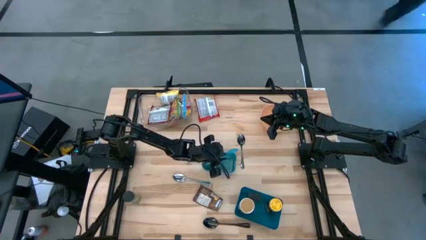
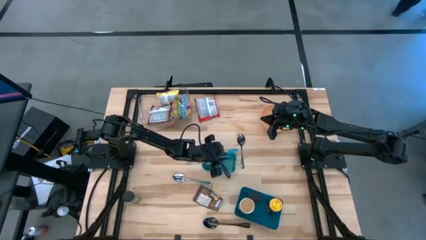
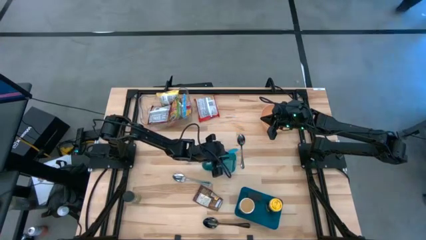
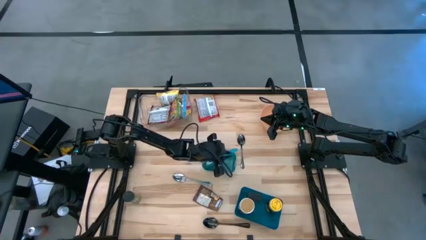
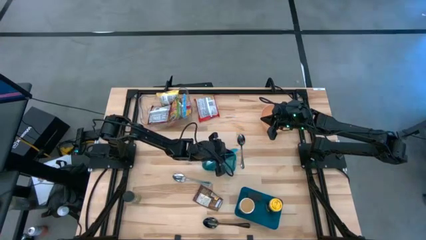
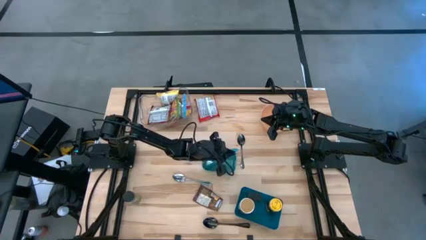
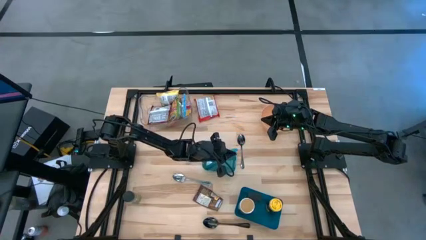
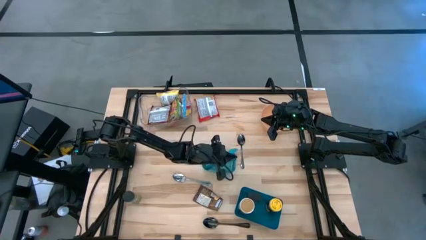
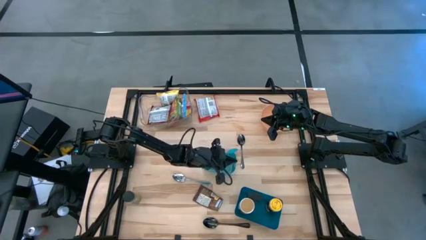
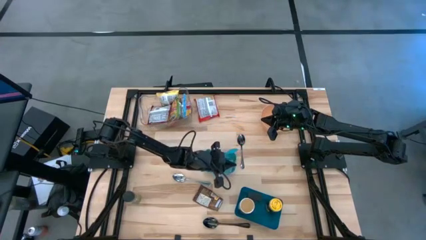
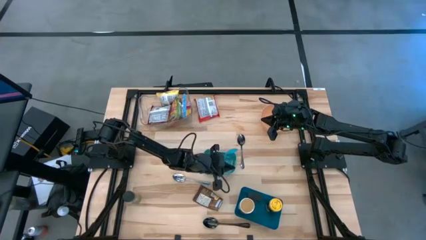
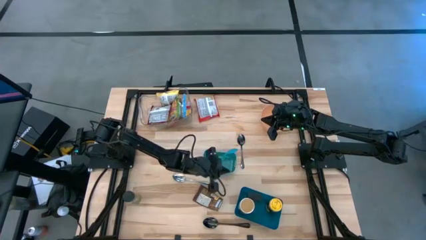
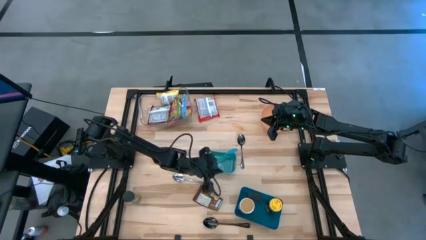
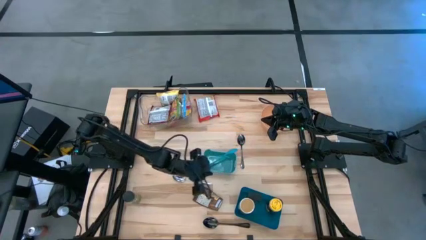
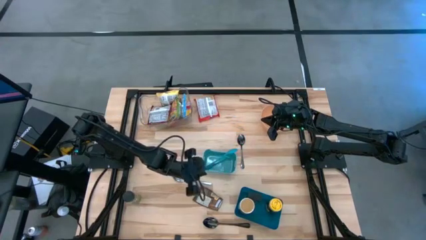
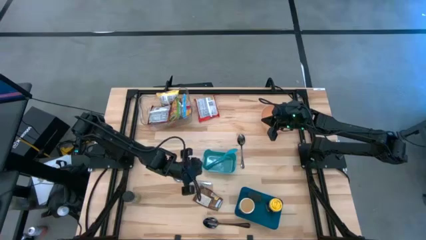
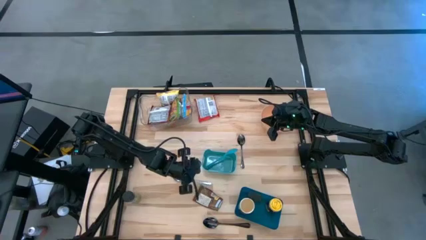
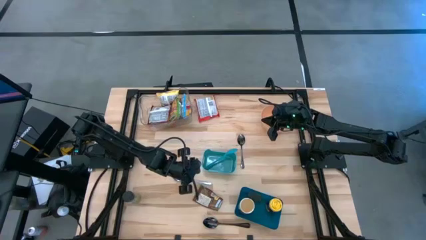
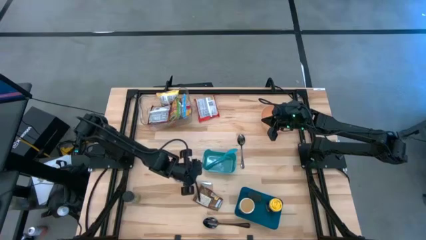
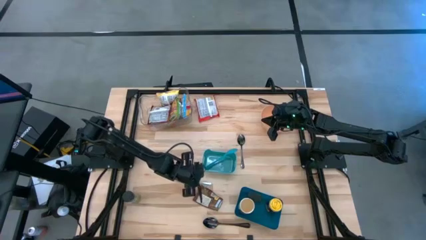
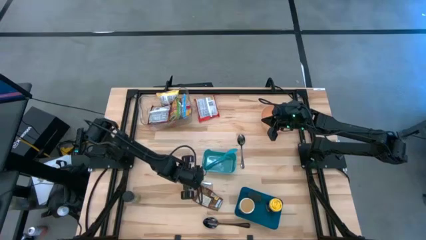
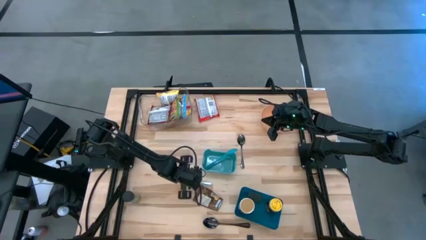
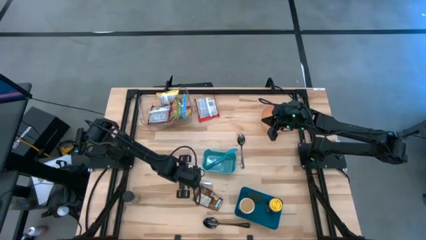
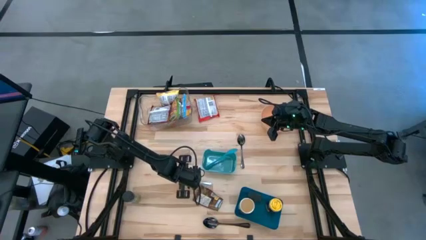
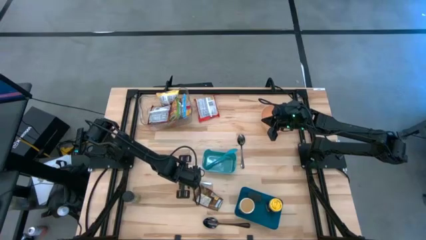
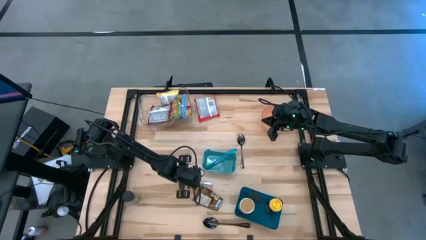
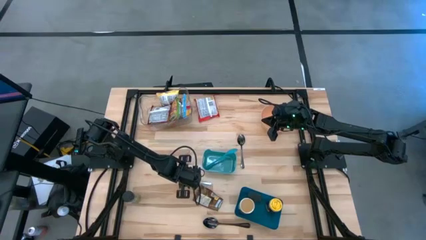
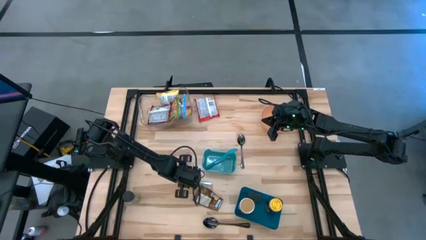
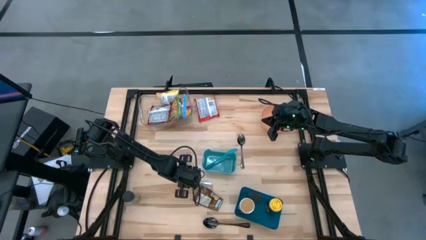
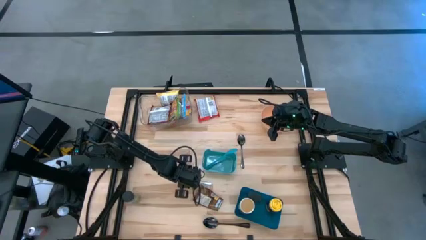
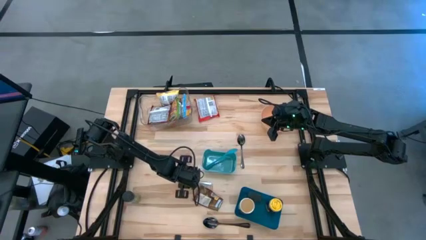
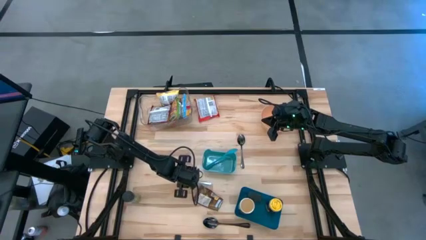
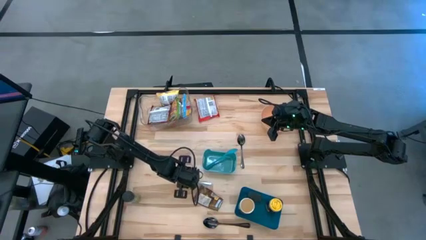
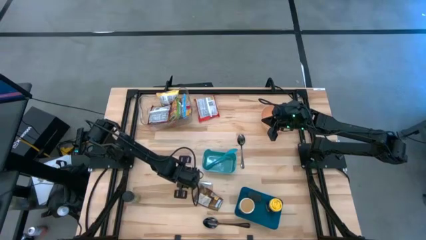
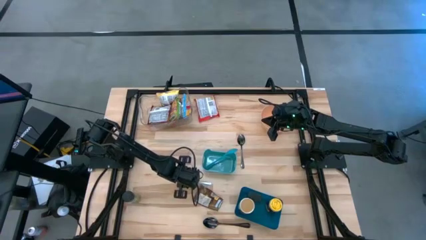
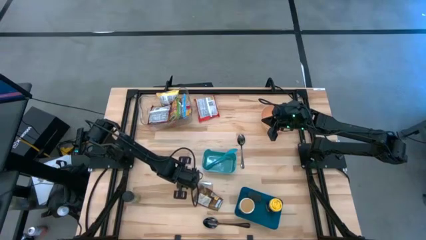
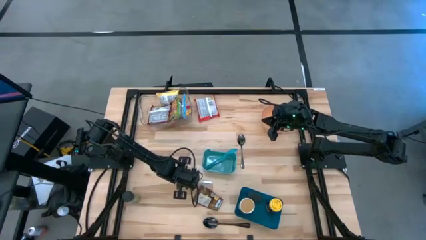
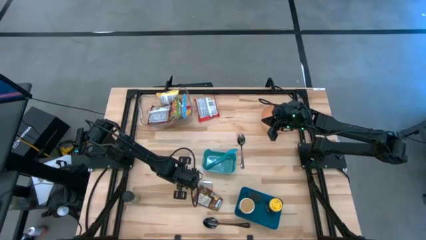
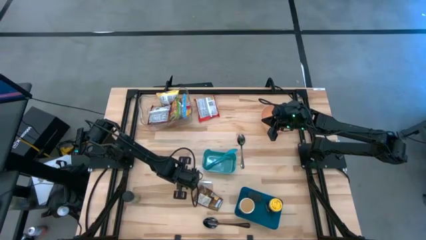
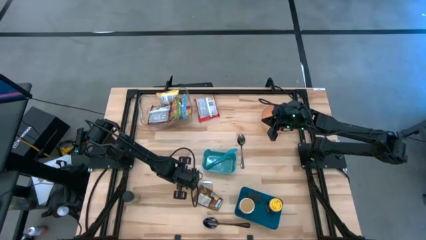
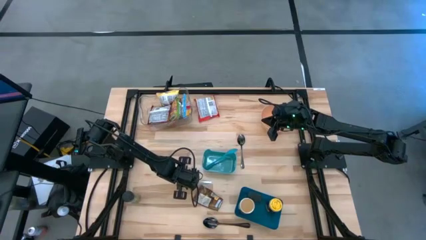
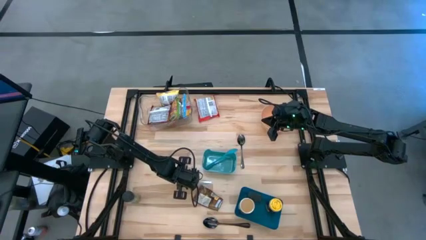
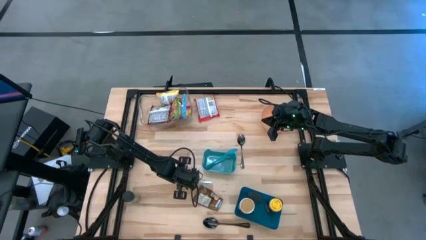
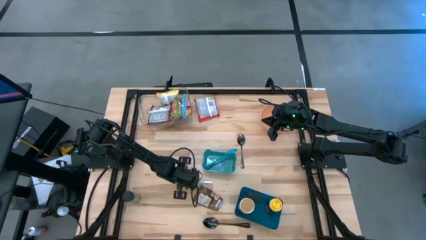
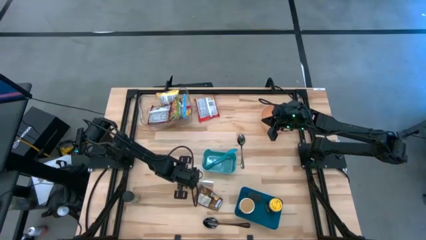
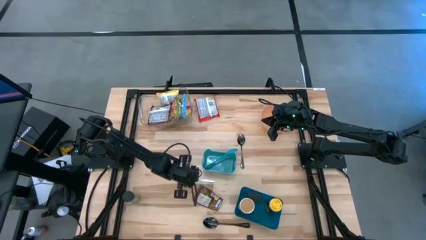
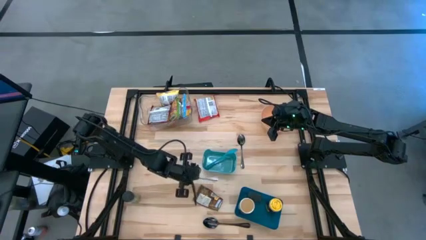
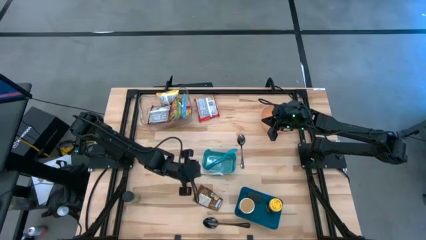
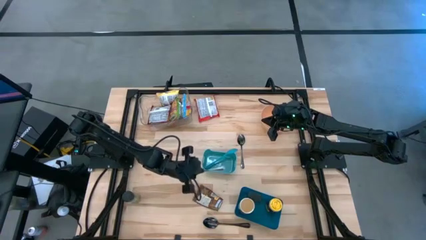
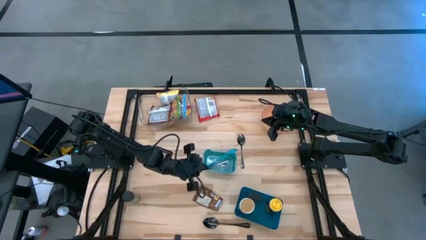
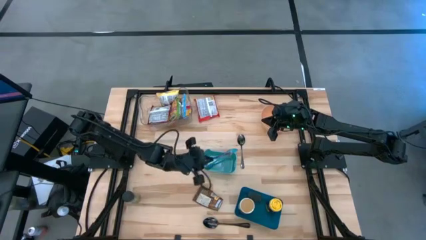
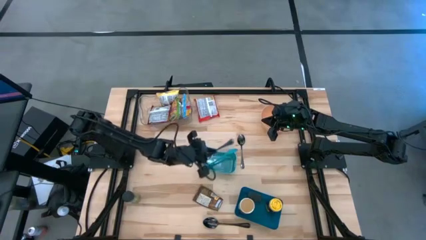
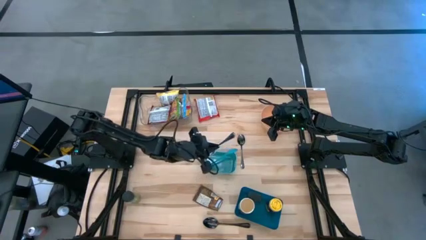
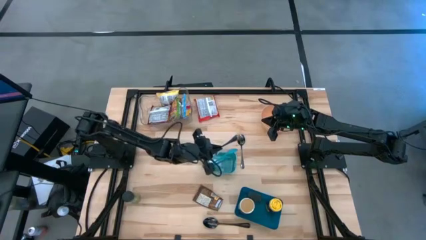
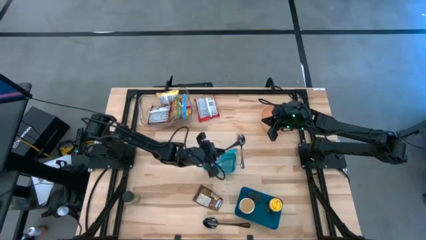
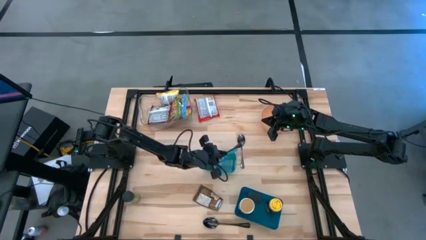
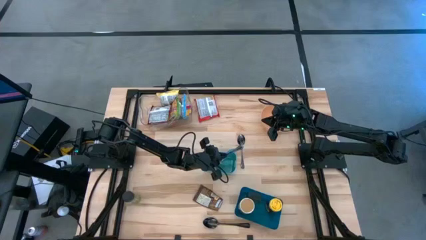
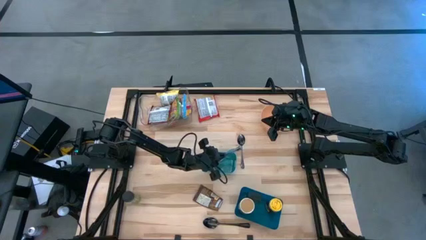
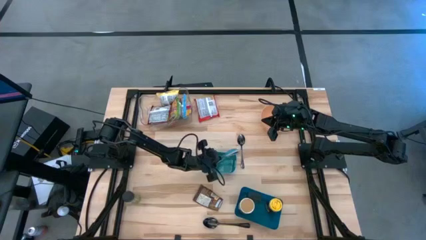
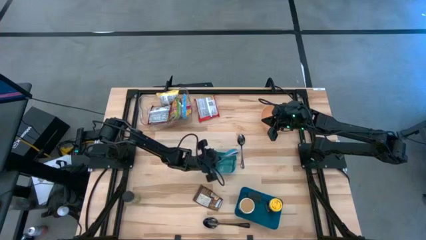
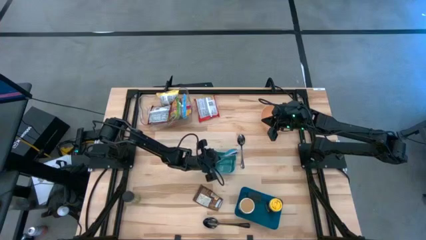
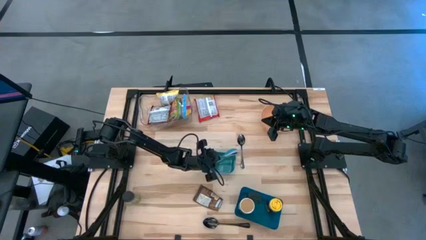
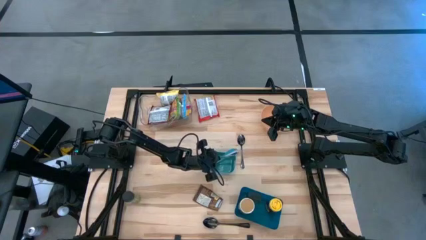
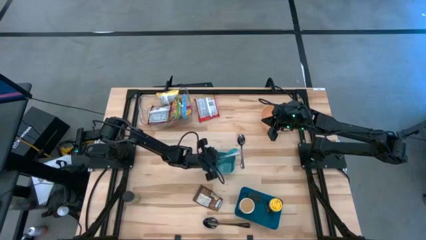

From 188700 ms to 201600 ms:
Task: Pick & Place Food Item
Put the silver tablespoon into the green bin
